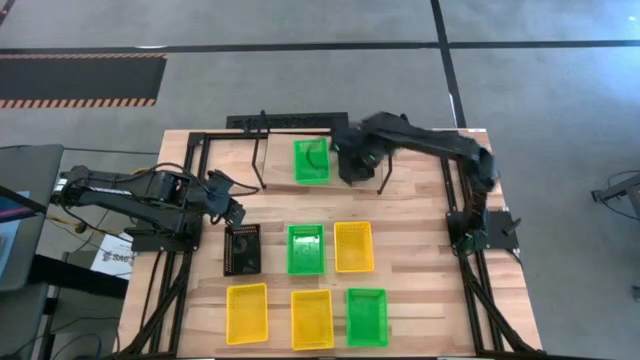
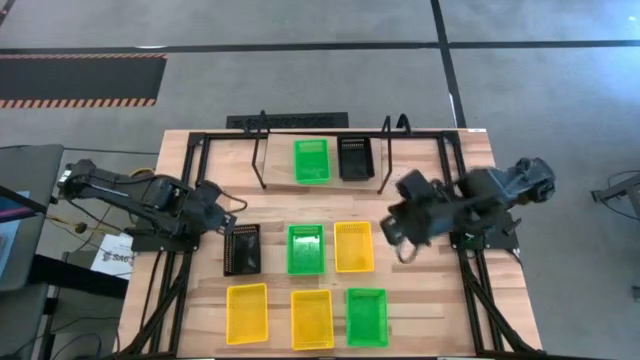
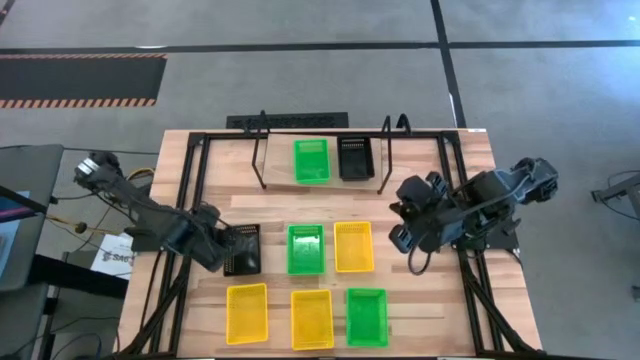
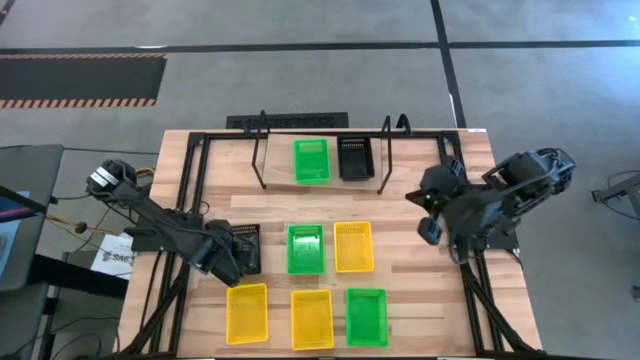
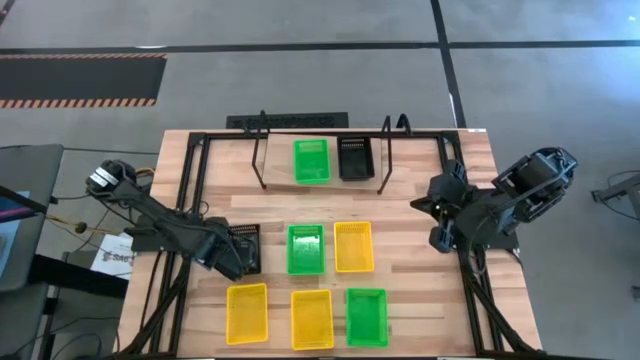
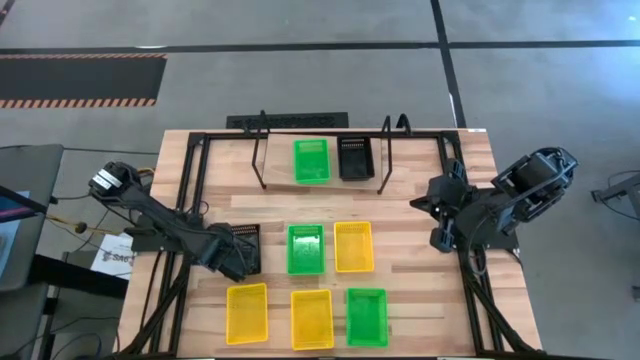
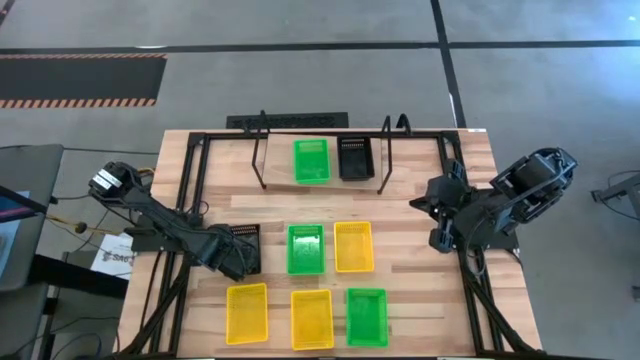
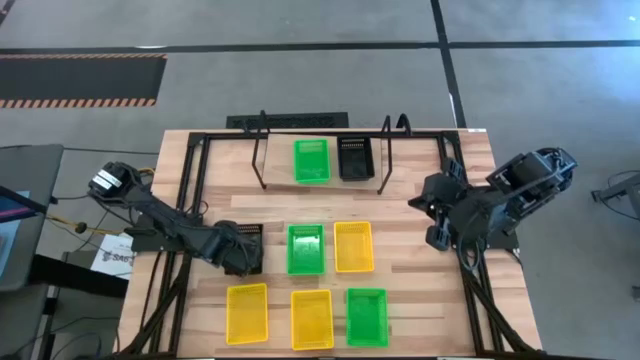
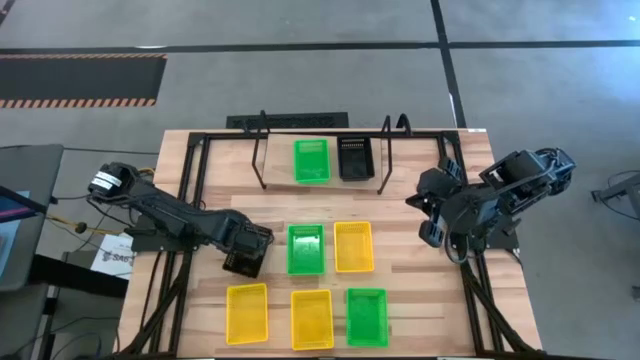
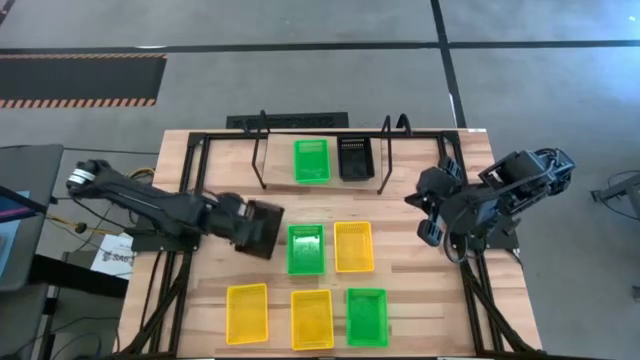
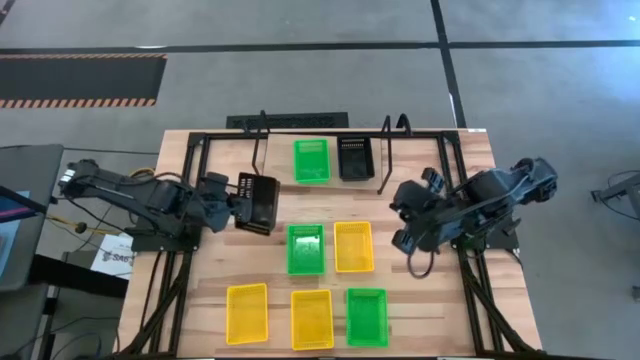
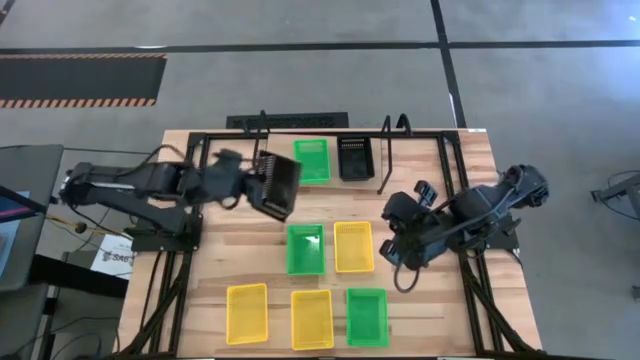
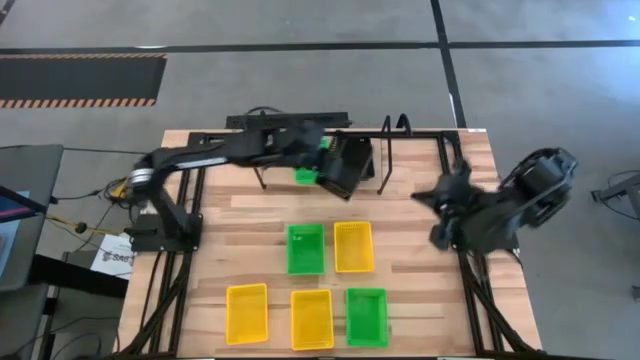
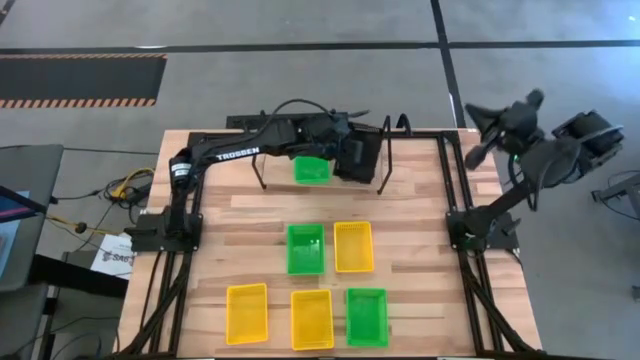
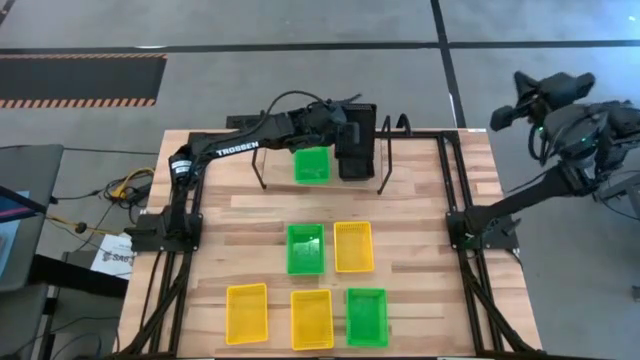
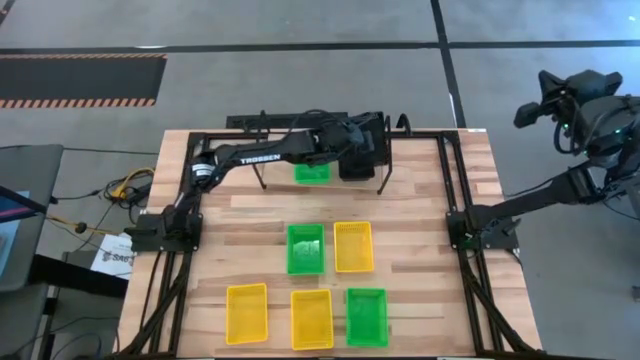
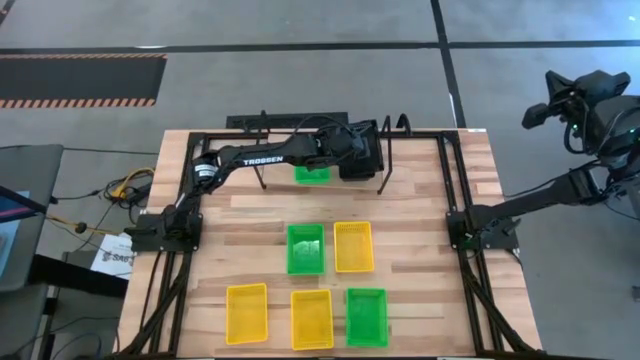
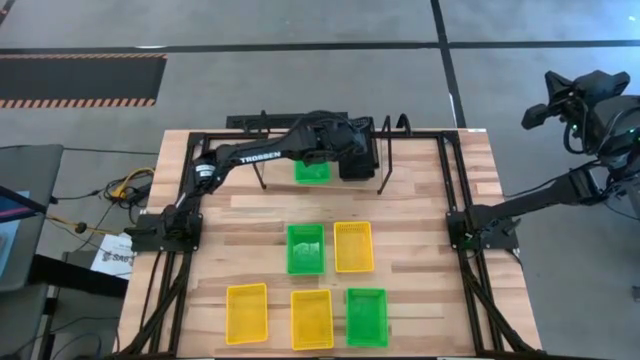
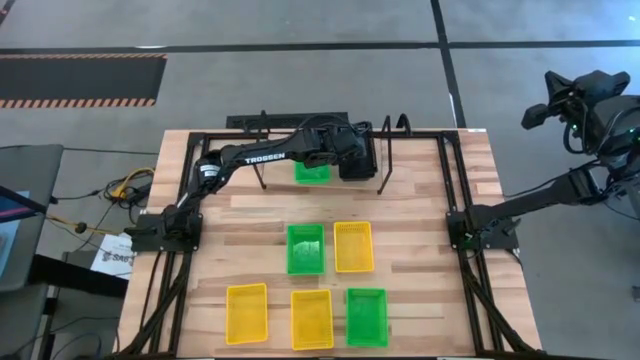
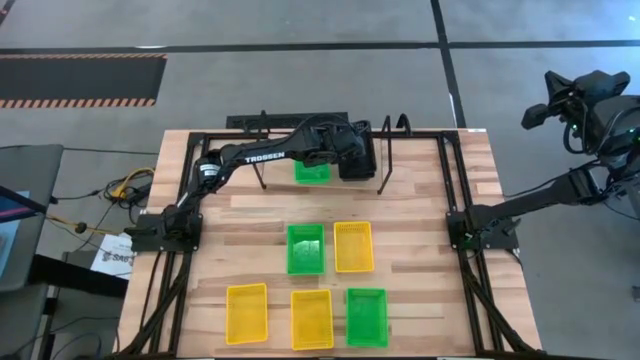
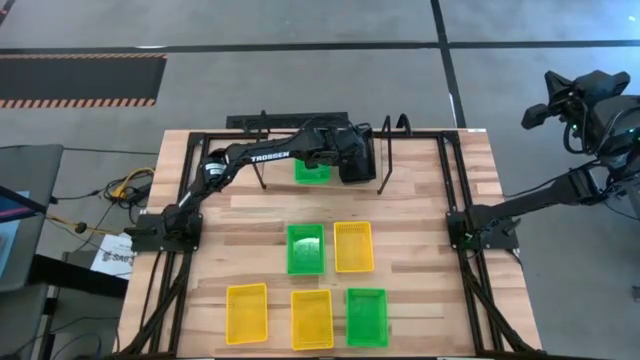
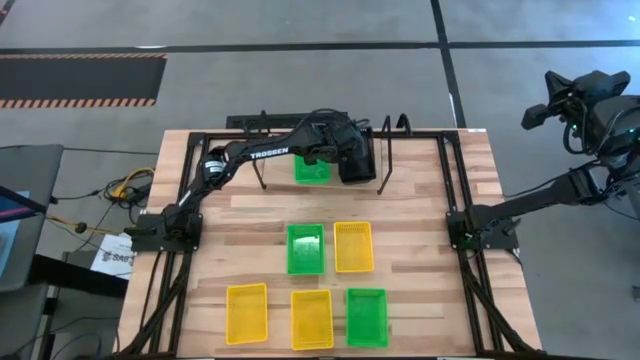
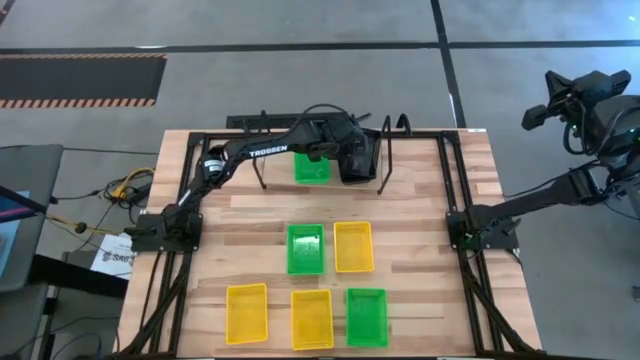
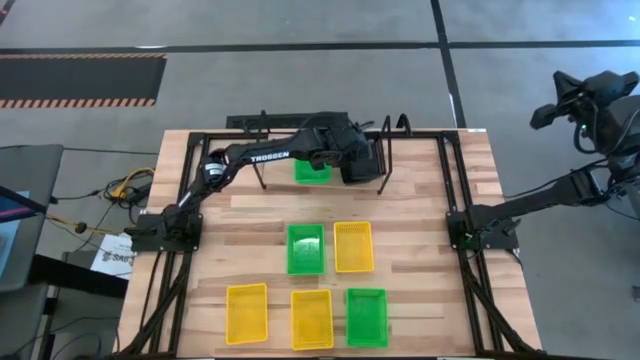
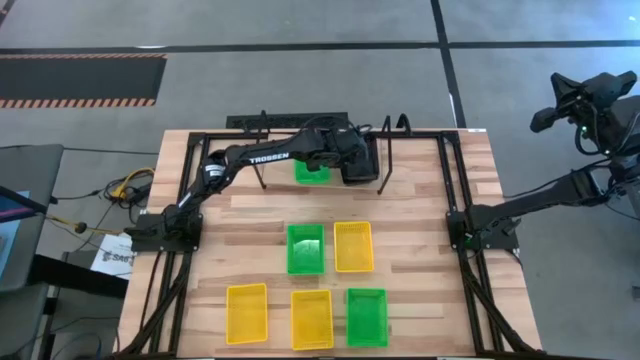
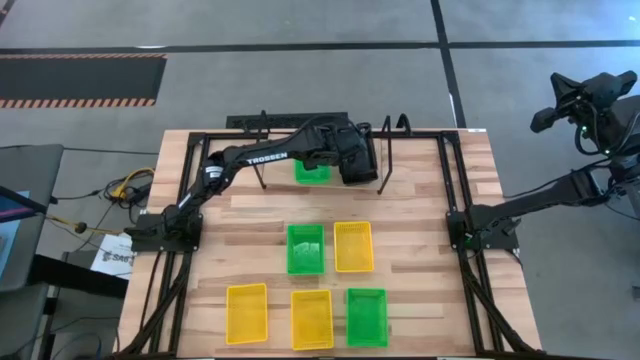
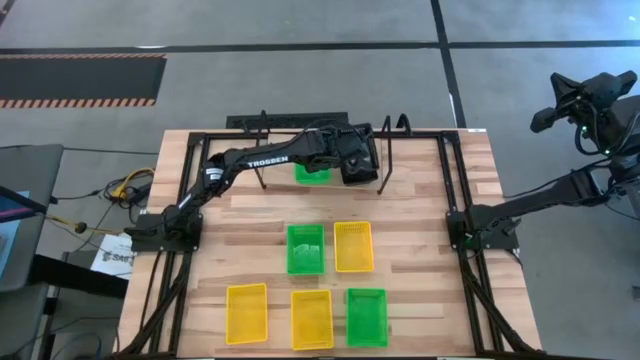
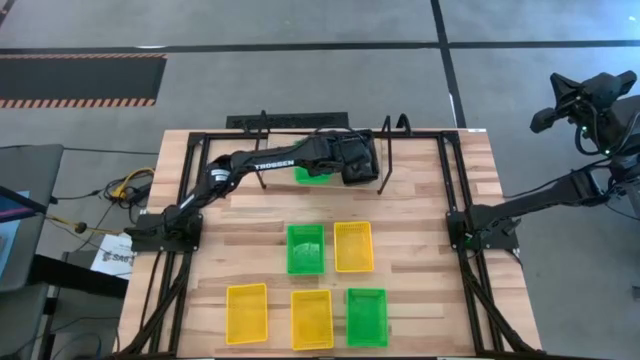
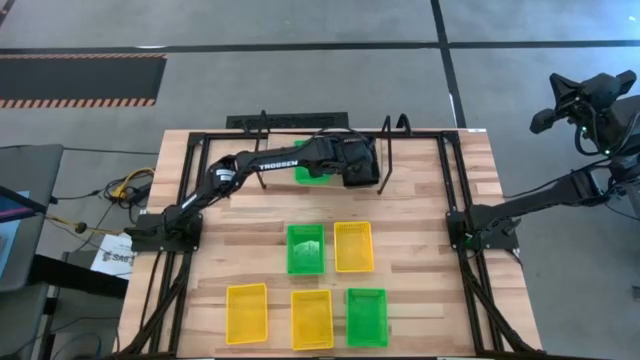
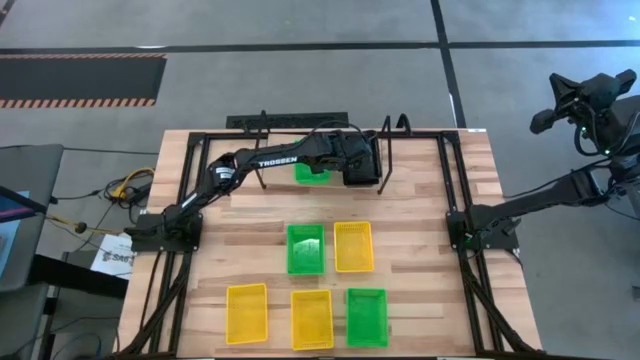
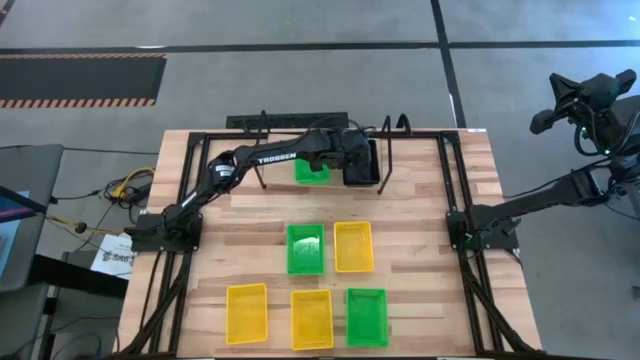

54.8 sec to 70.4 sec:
Task: Stack baskets on shelf by color
Stack the black basket on top of the other black stacked baskets on the shelf

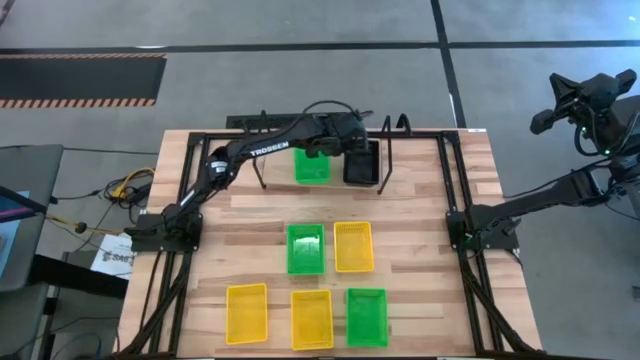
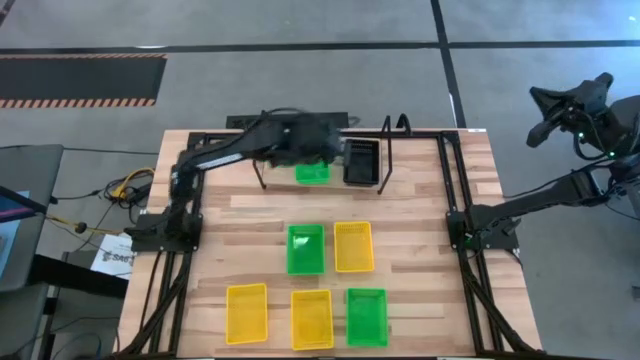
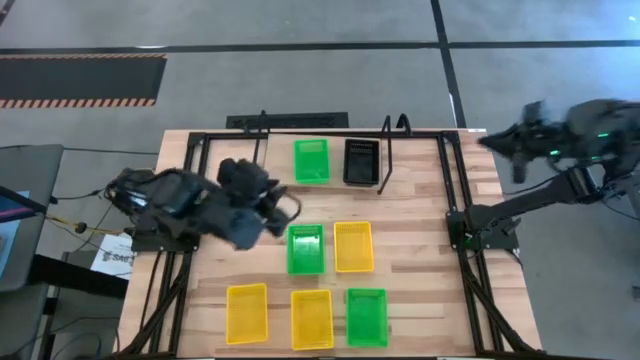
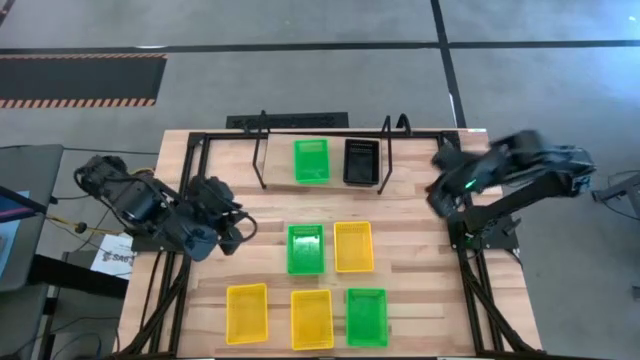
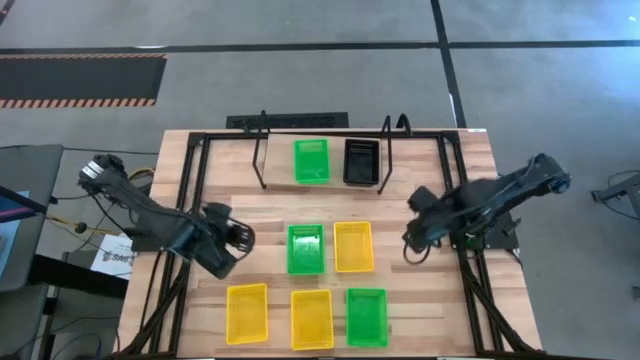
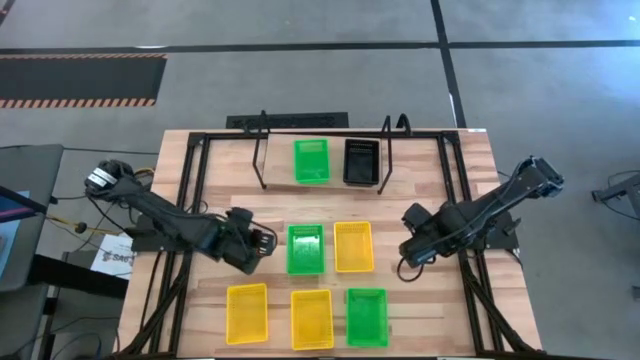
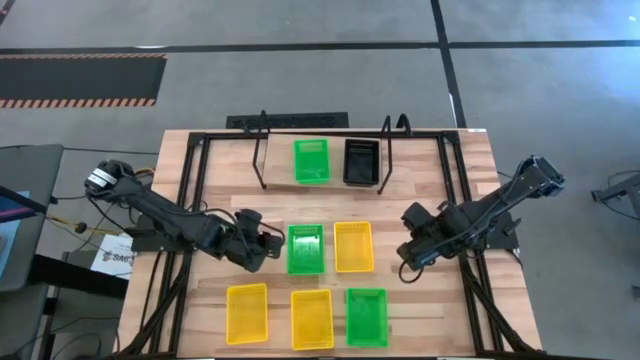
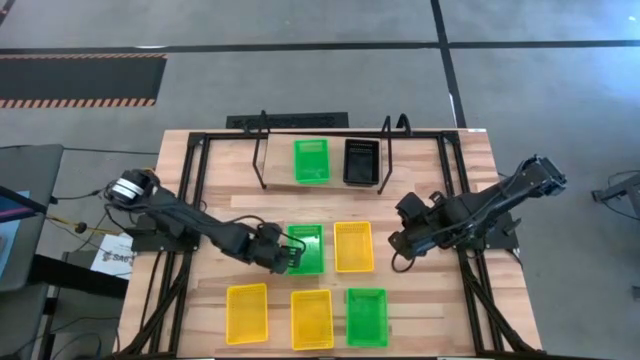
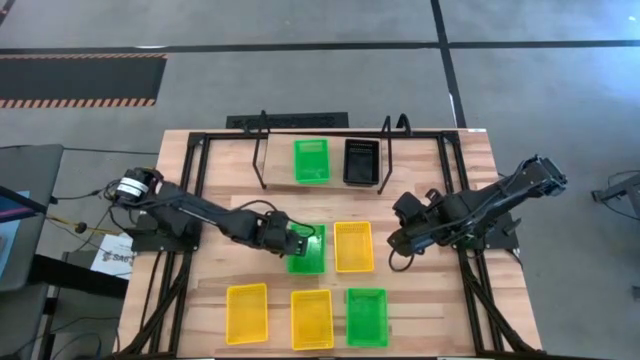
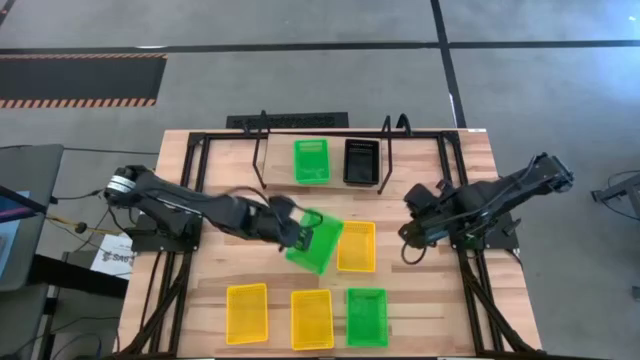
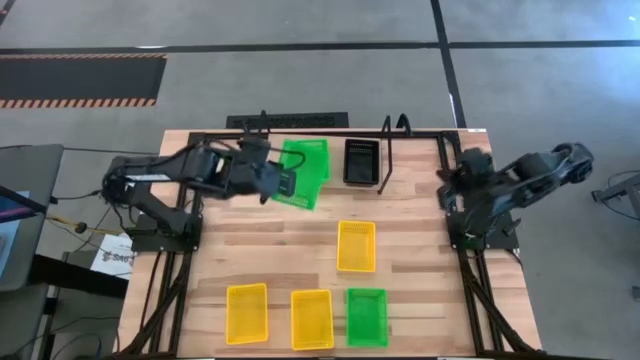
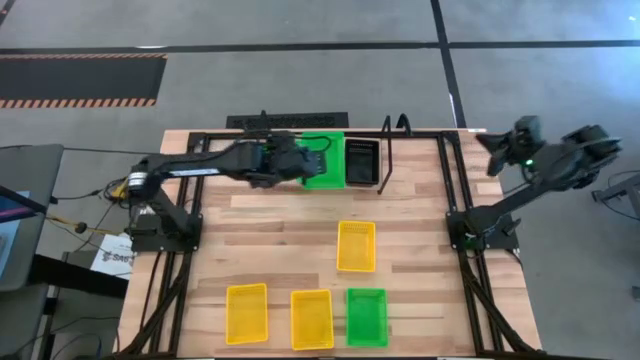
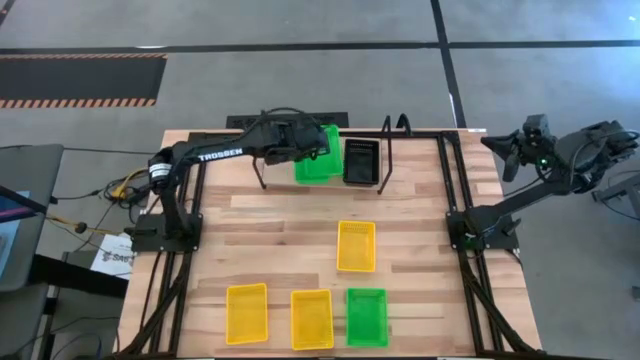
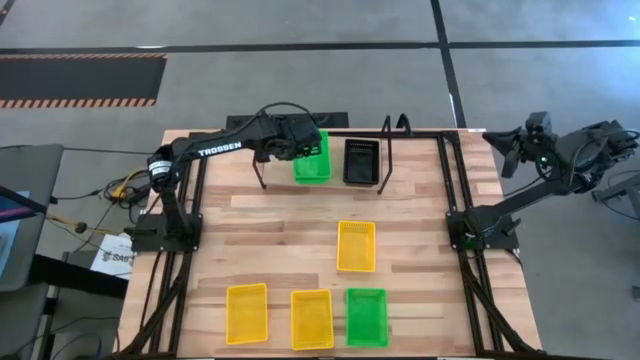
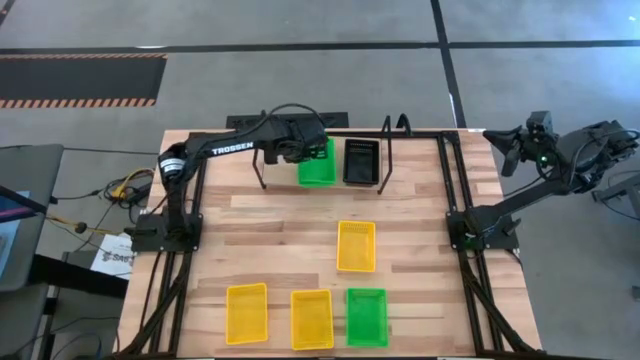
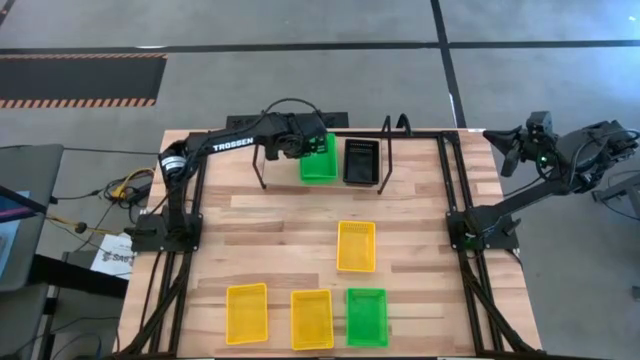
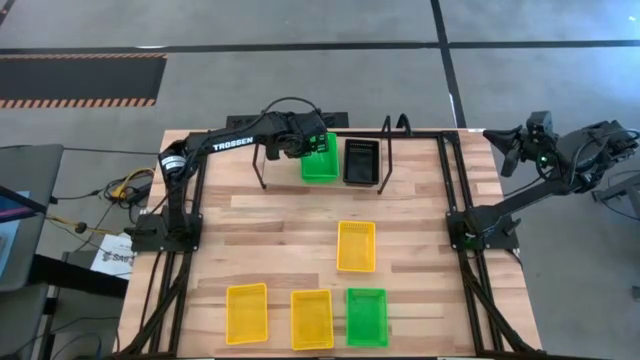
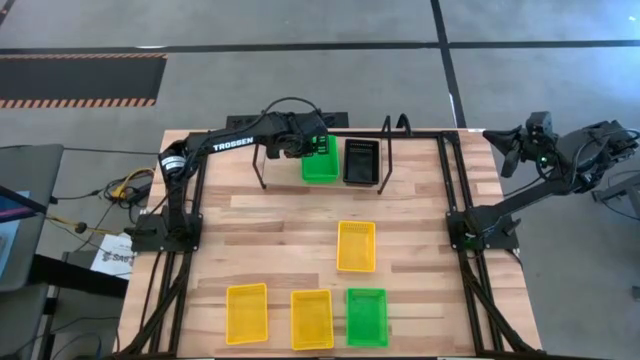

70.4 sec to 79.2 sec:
Stack the top green basket on top of the other green basket on the shelf
